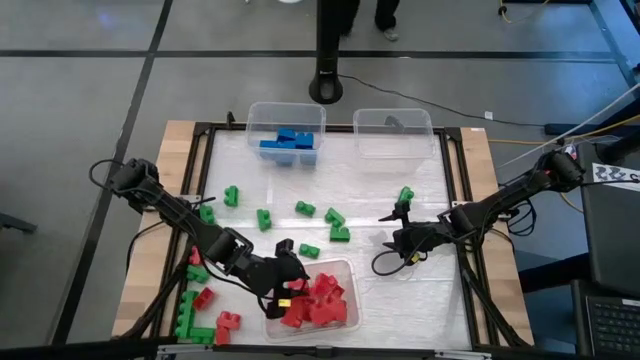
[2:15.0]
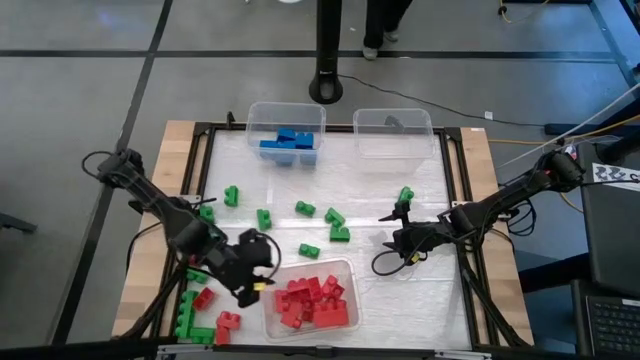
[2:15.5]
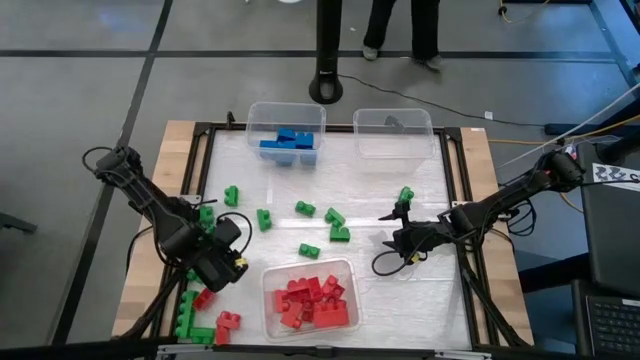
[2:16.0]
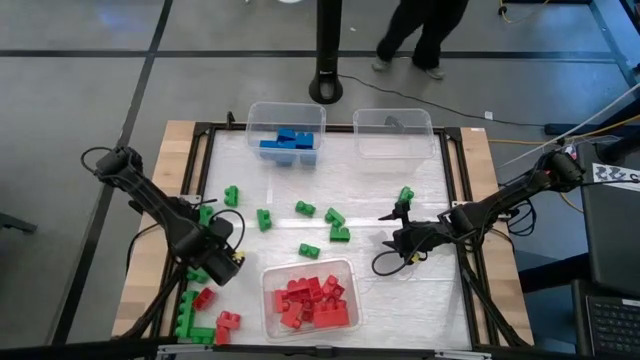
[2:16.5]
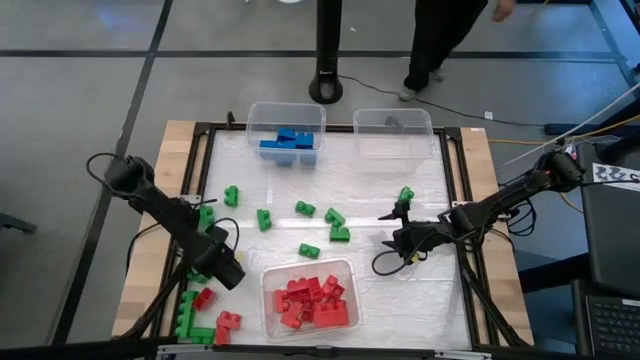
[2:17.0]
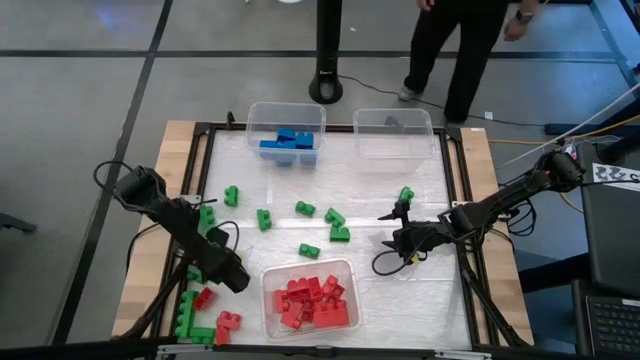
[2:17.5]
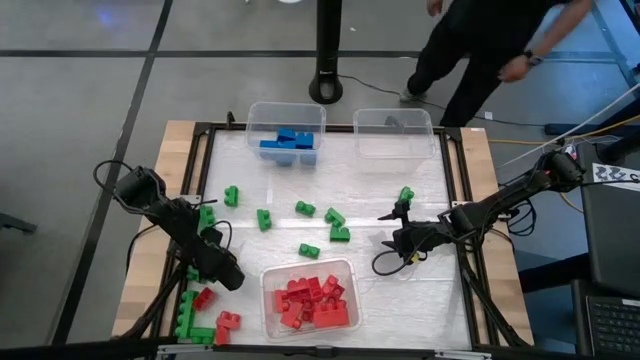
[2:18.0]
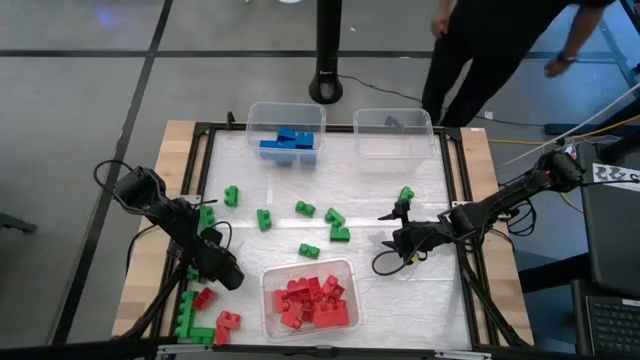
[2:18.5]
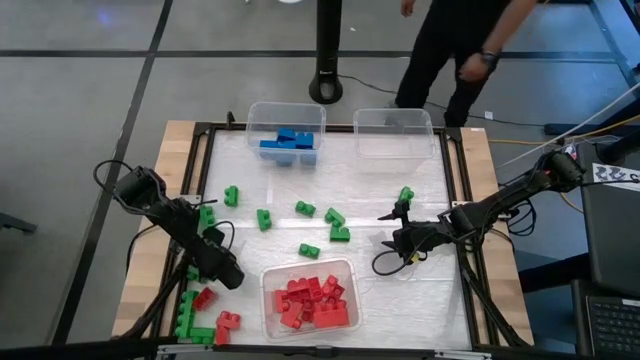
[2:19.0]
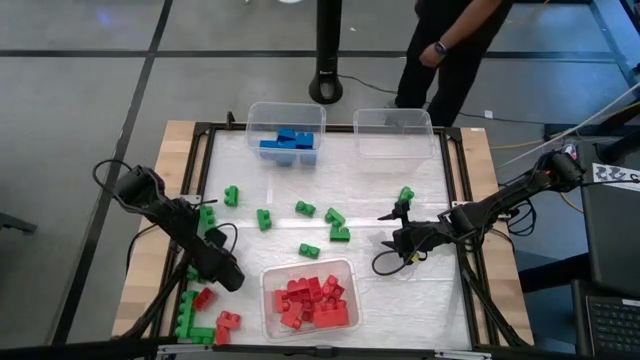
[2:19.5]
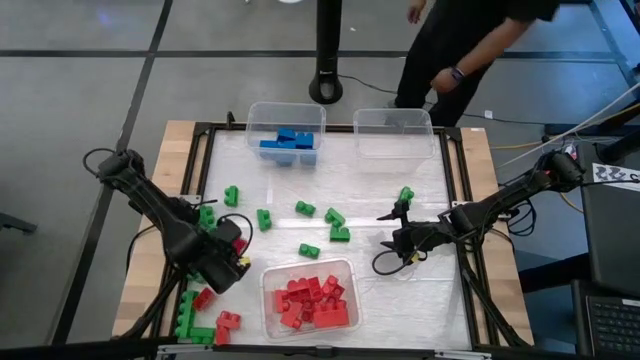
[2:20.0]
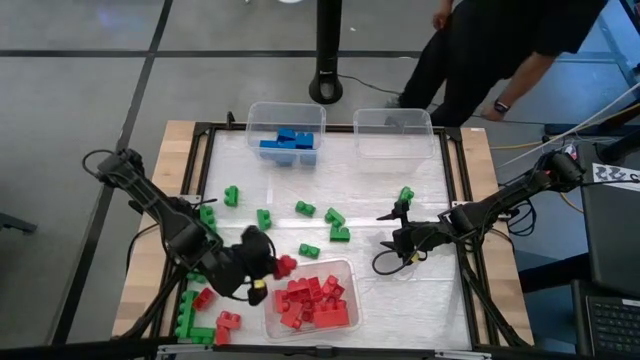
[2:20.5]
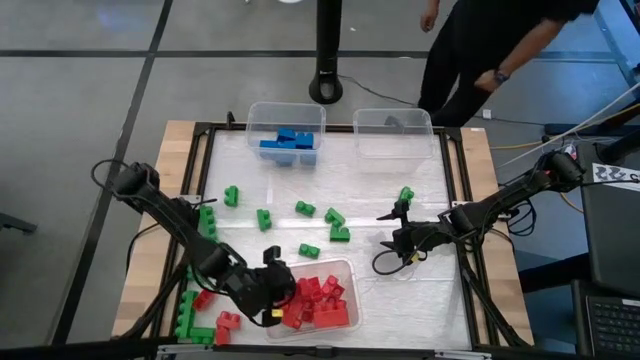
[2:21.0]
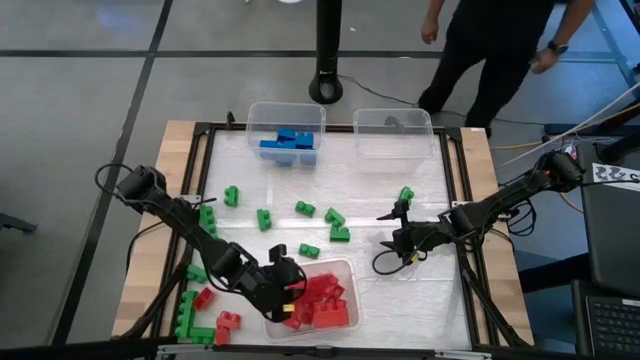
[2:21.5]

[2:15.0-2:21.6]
Task: Sort blocks
Put the red game piece into the bottom transparent bin

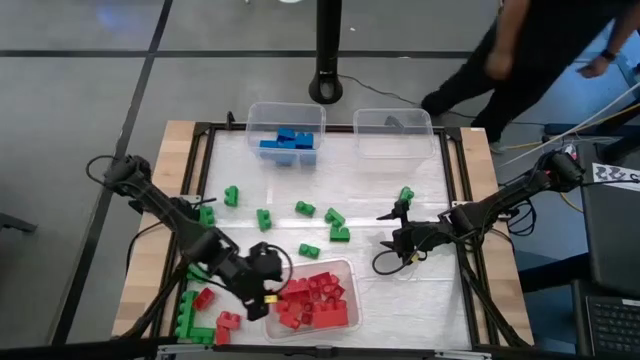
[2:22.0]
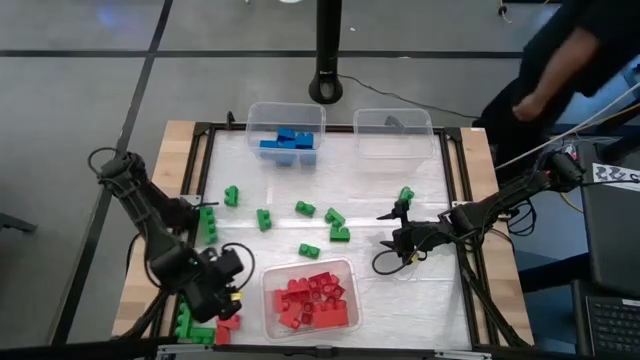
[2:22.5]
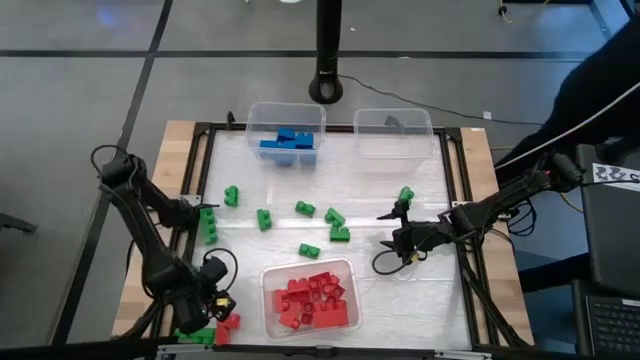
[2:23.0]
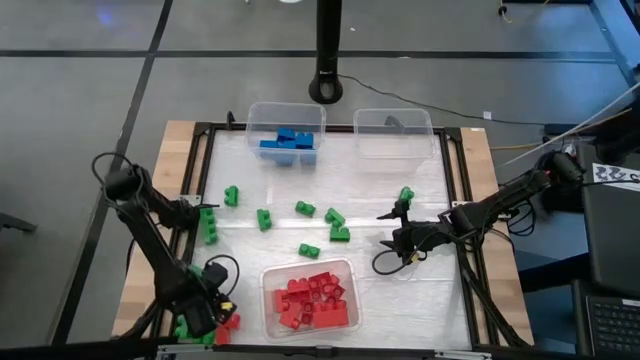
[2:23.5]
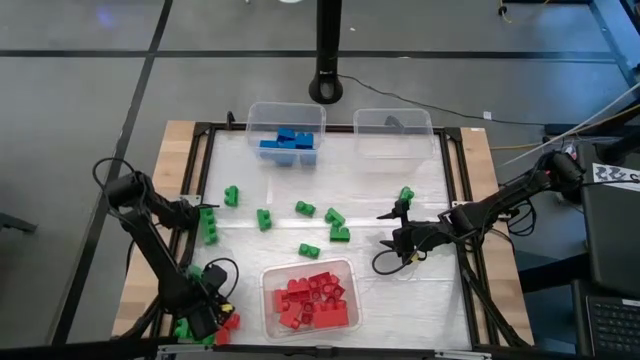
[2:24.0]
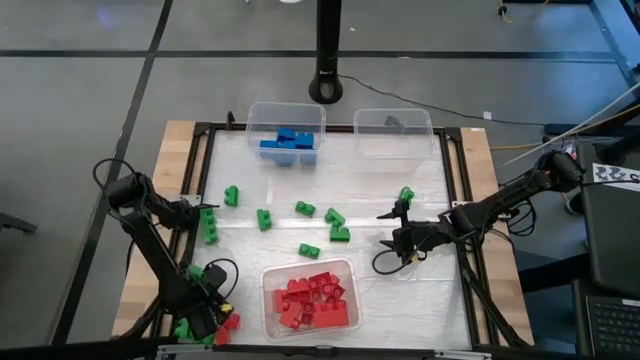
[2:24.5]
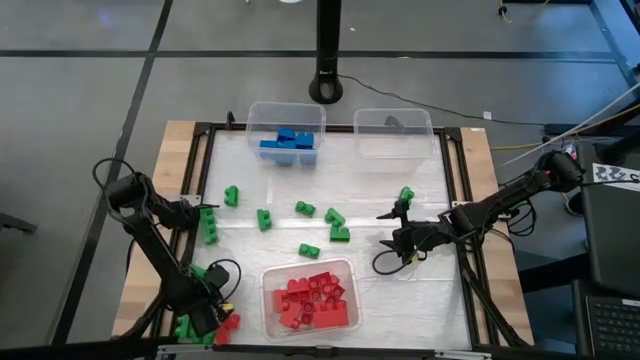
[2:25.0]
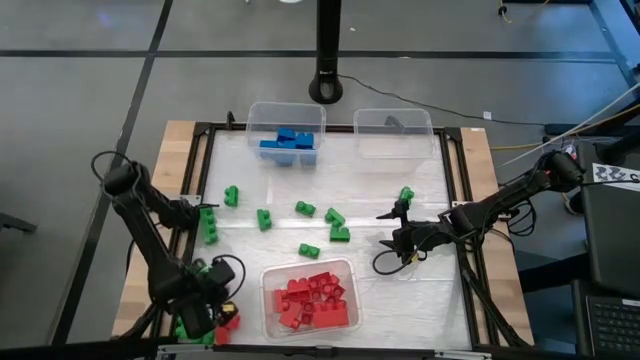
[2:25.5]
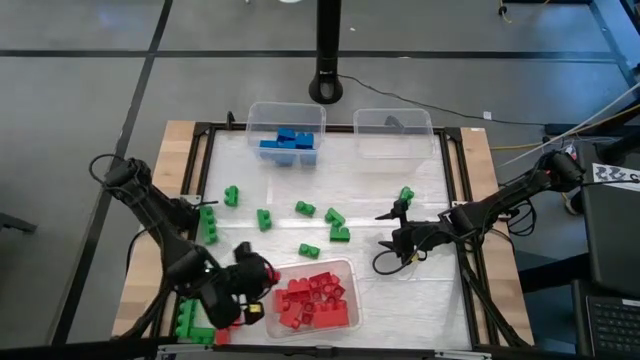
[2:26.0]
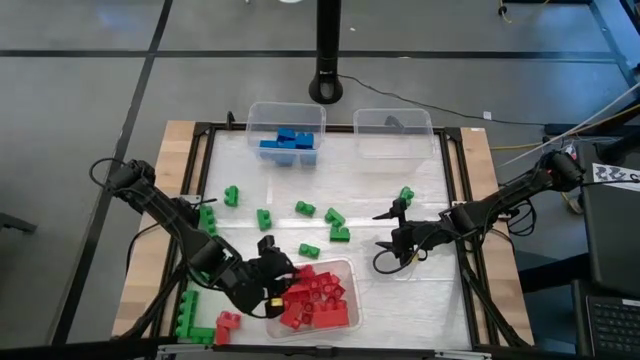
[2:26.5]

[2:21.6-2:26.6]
Put the red game piece into the bottom transparent bin

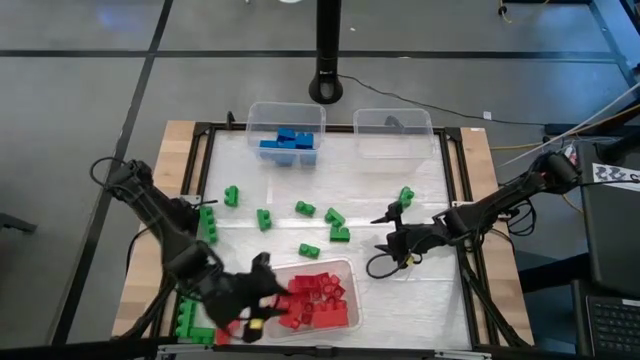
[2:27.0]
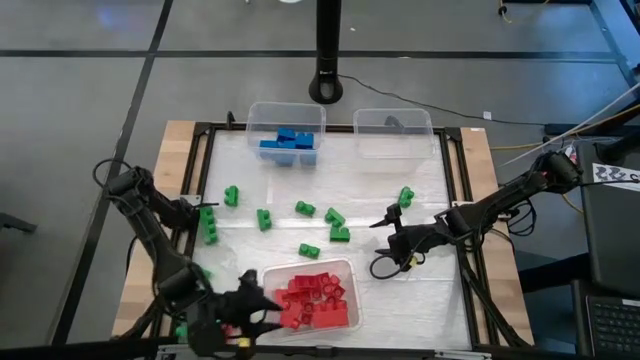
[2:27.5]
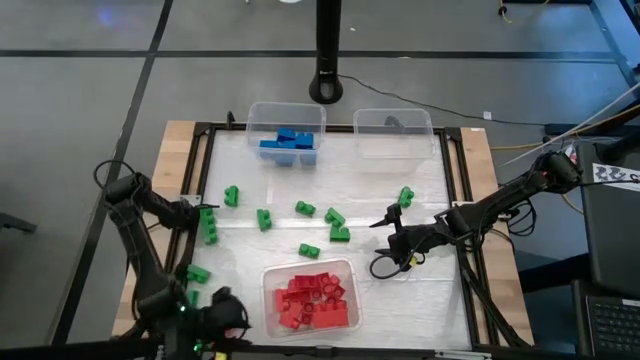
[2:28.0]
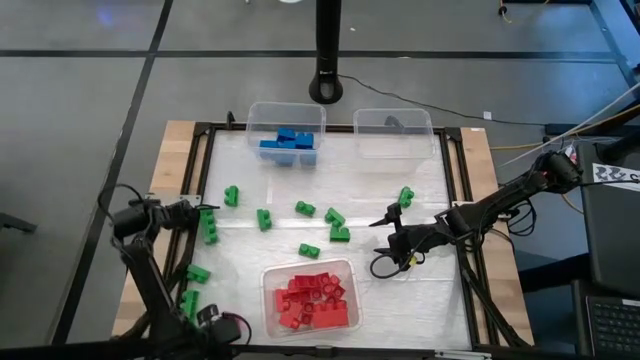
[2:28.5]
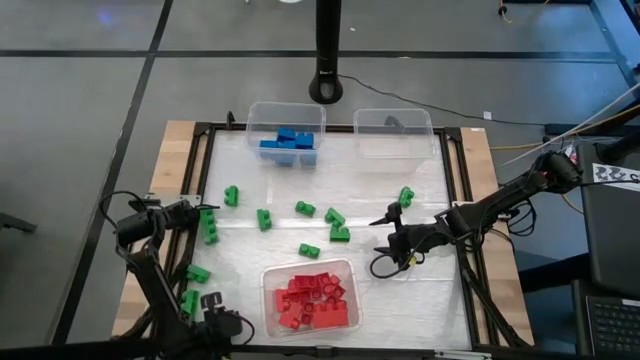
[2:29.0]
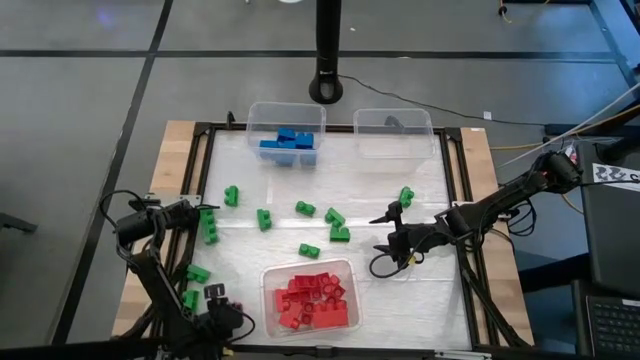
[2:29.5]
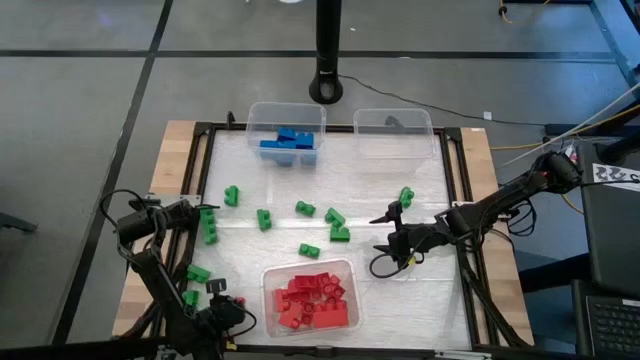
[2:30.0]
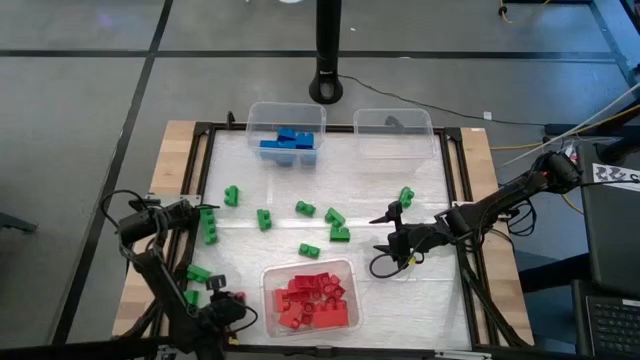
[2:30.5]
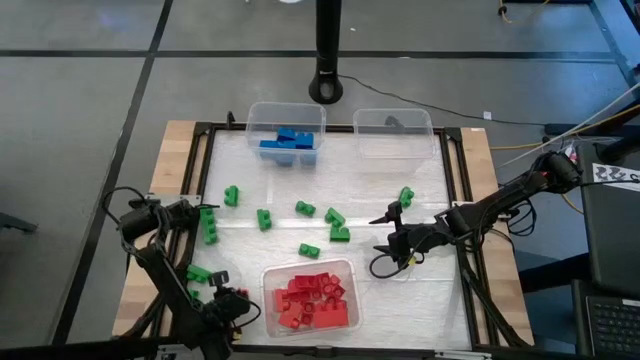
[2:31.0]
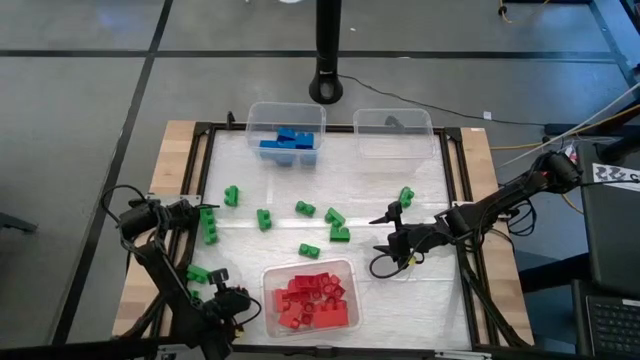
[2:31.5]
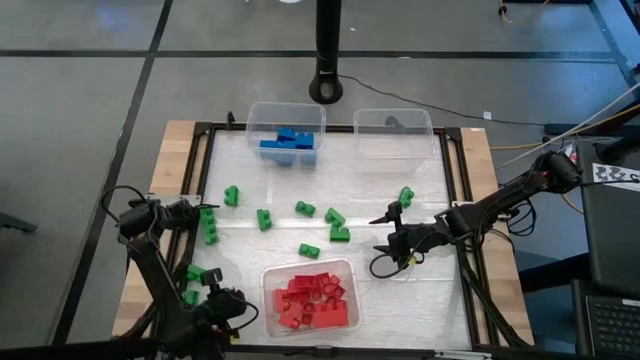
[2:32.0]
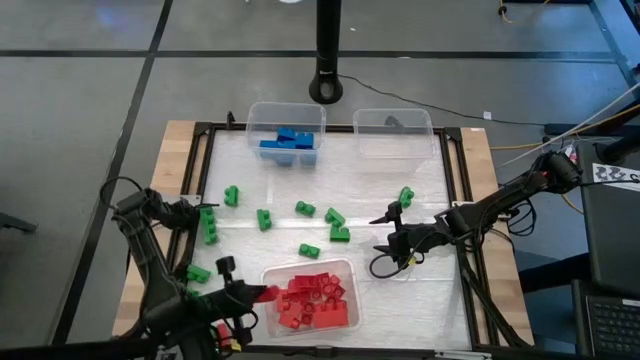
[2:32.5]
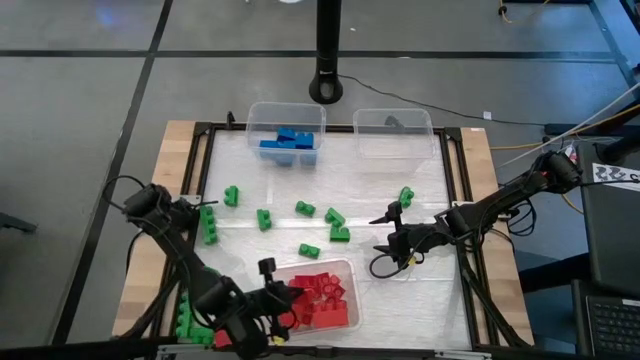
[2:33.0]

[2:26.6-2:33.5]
Put the red game piece into the bottom transparent bin

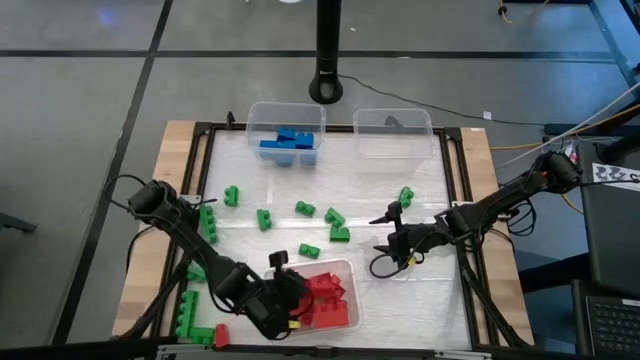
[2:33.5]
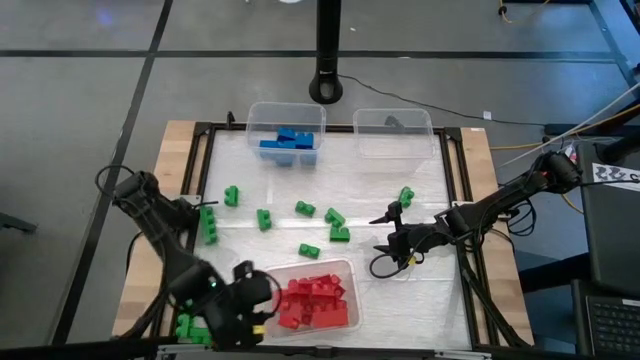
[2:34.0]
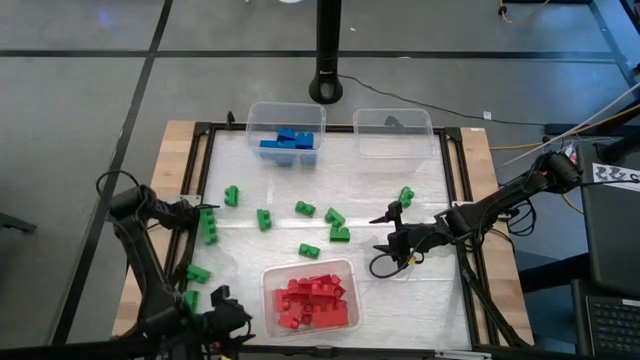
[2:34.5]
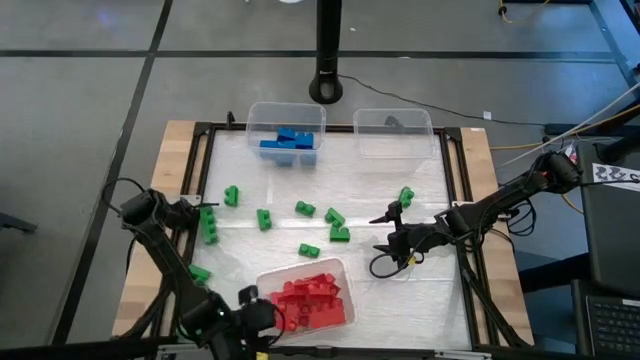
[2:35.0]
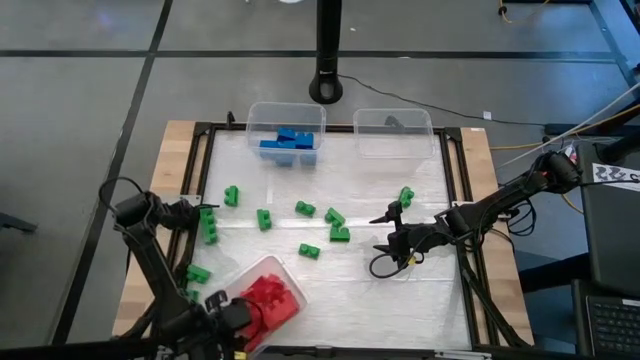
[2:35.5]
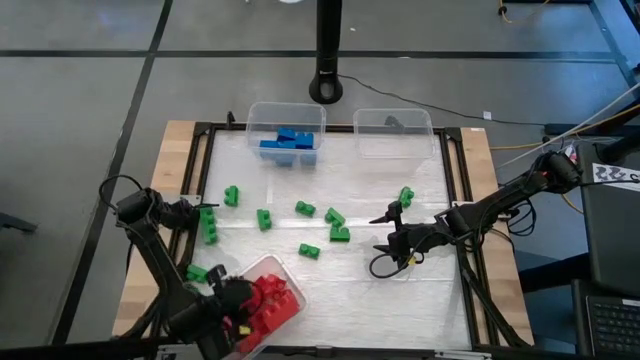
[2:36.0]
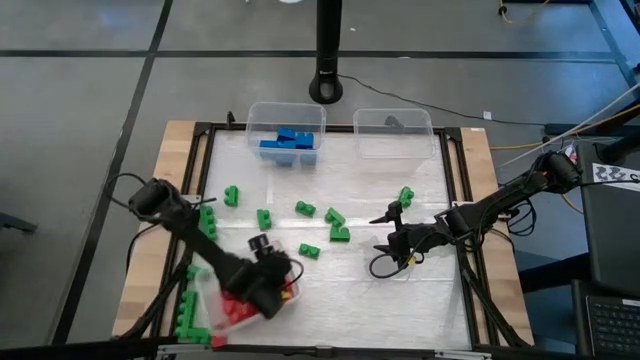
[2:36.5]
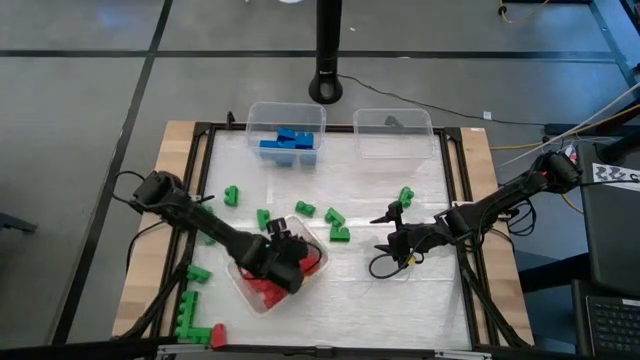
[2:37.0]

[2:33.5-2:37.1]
Move the bottom transparent bin to the center of the table
